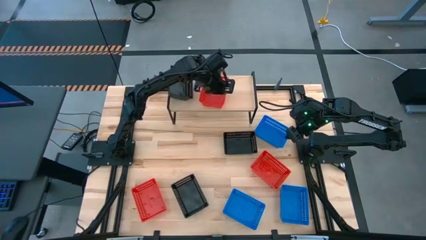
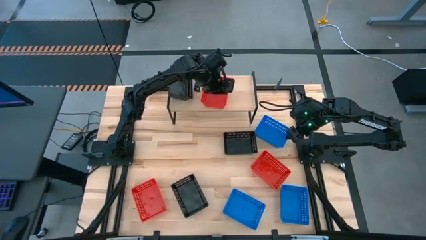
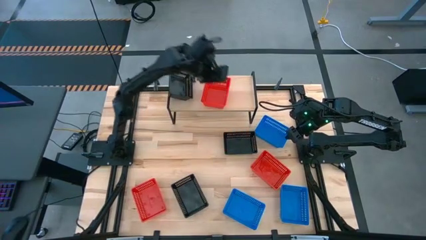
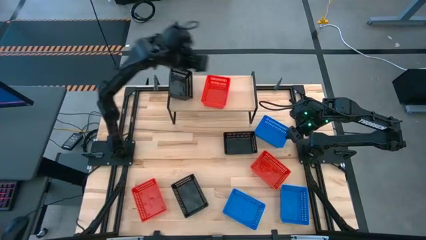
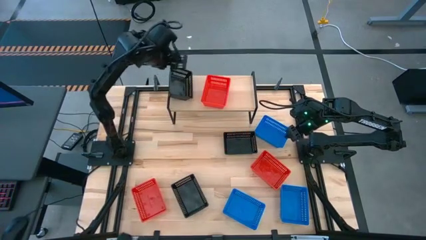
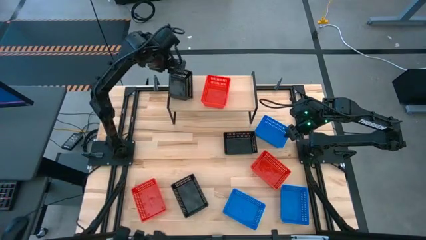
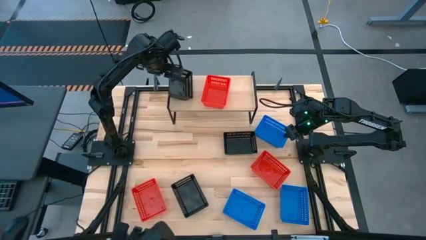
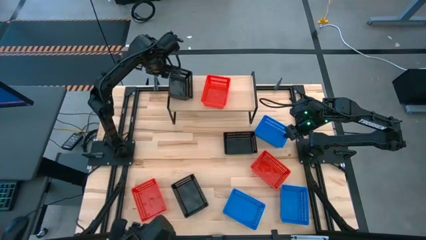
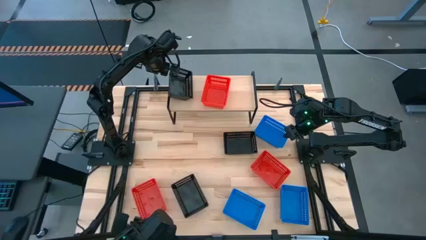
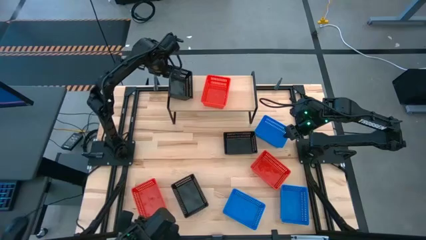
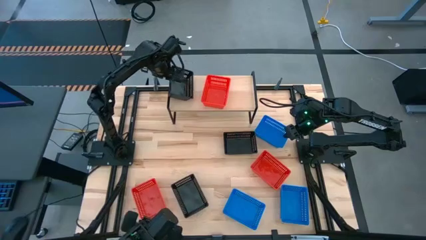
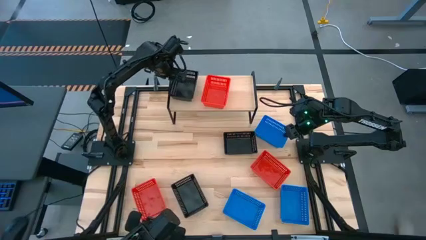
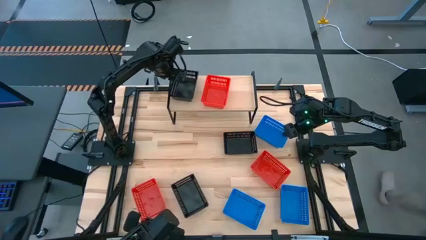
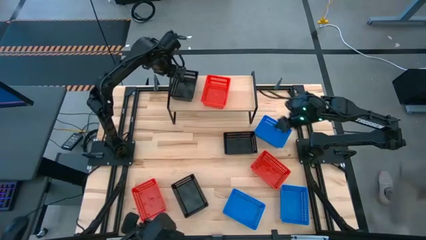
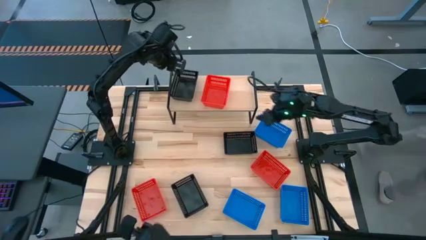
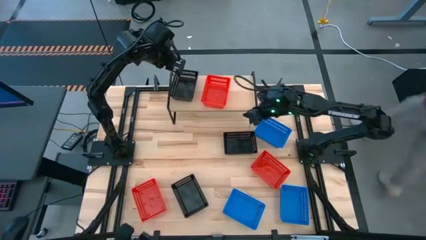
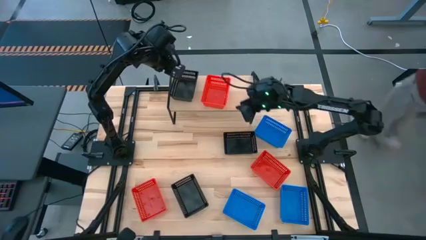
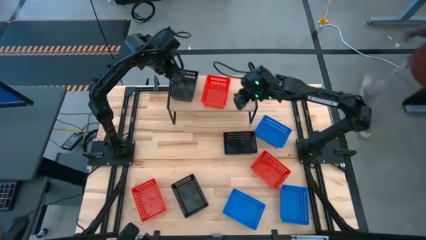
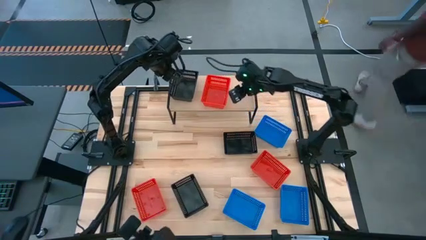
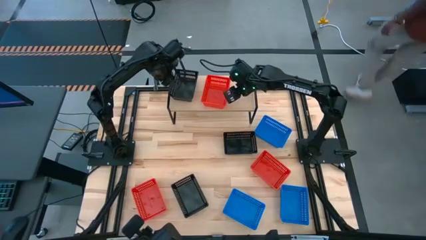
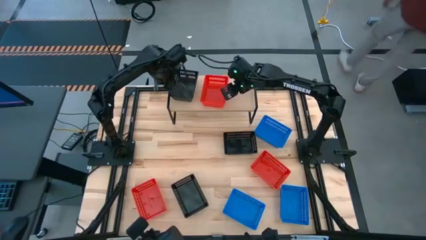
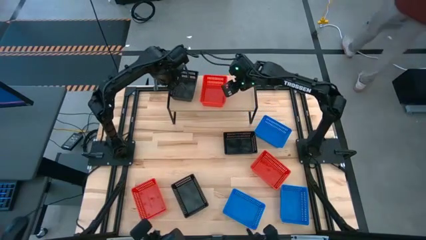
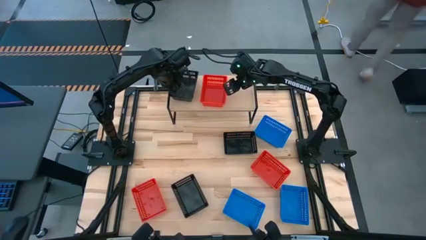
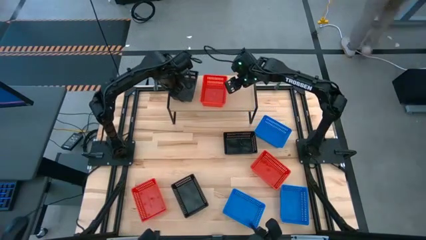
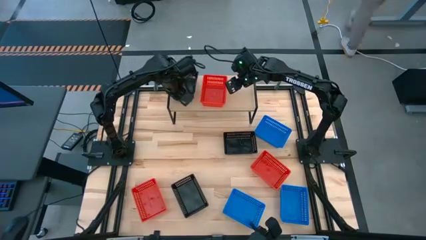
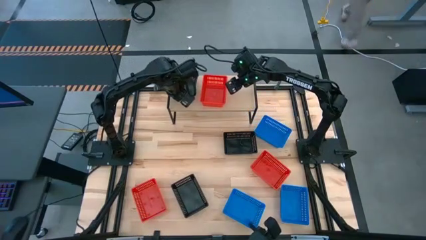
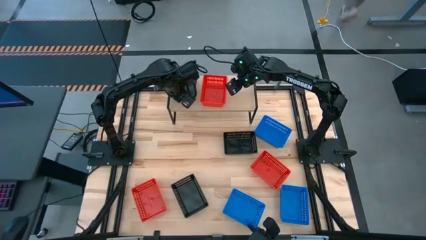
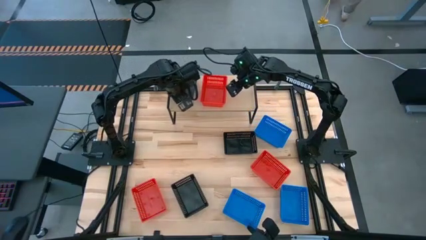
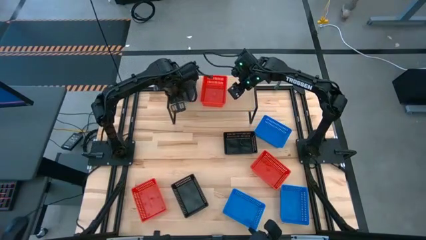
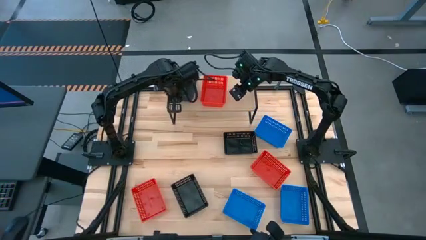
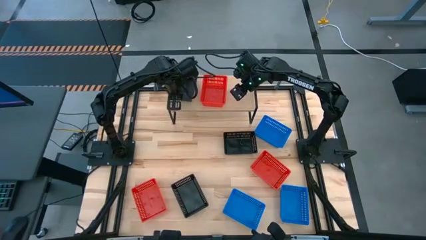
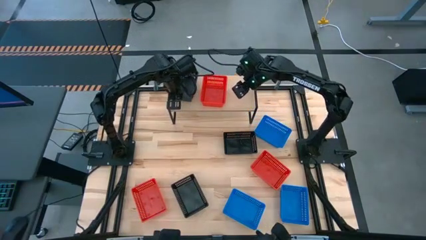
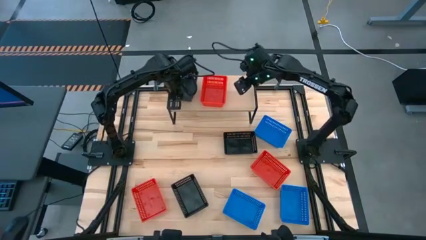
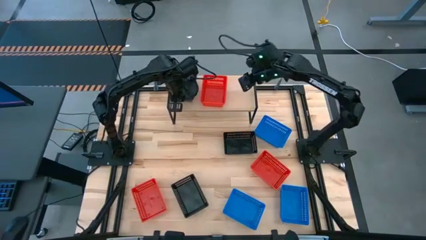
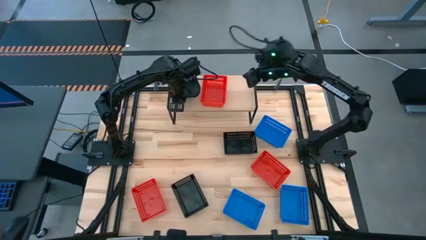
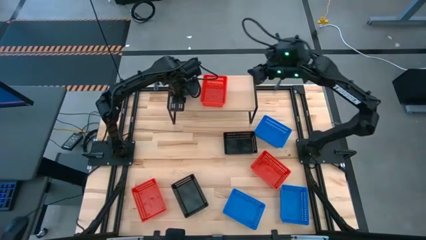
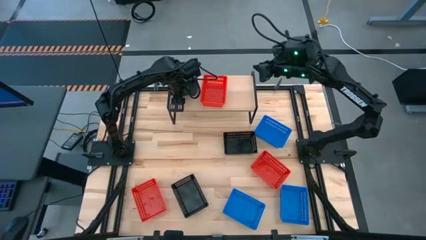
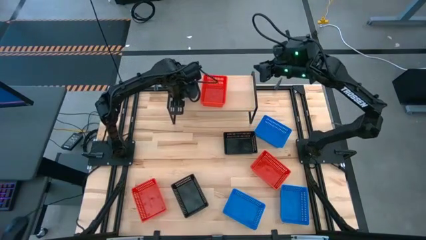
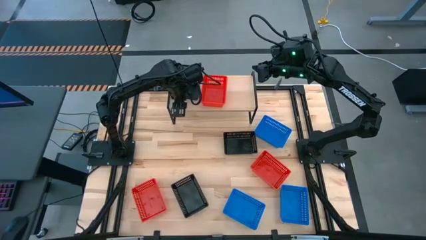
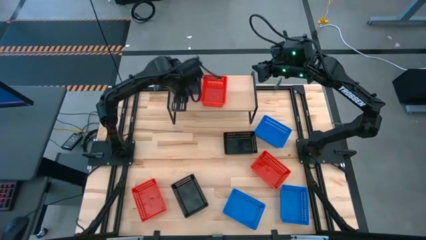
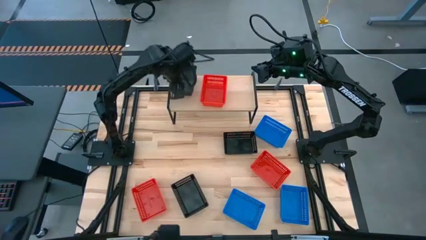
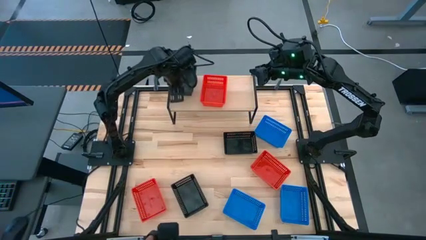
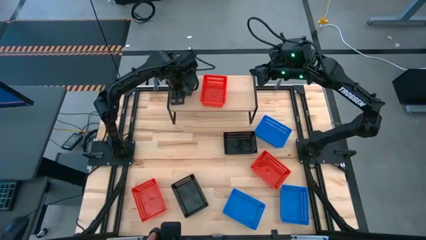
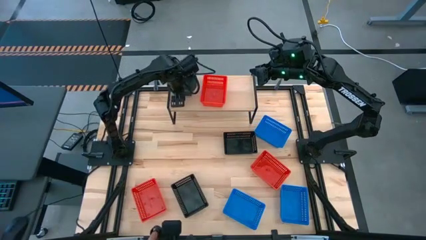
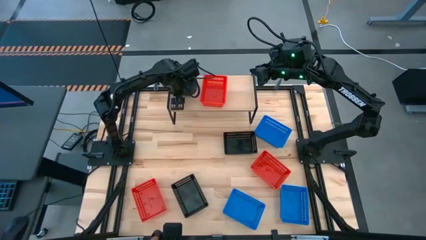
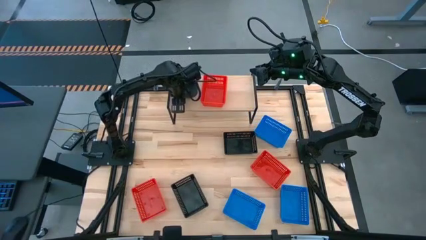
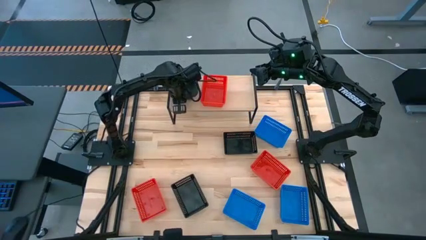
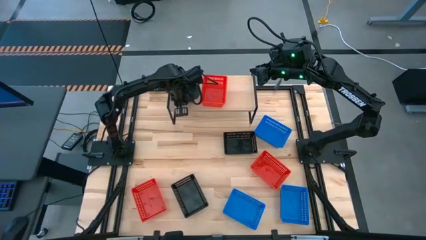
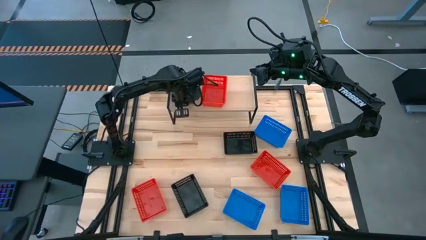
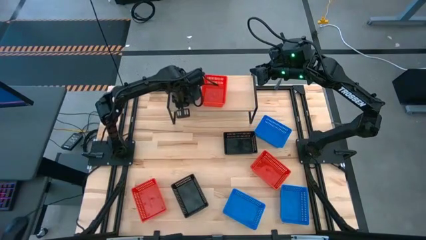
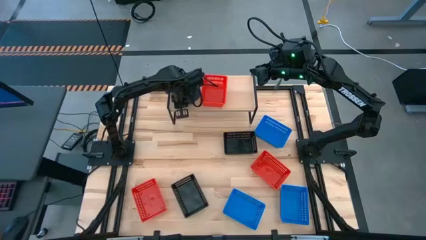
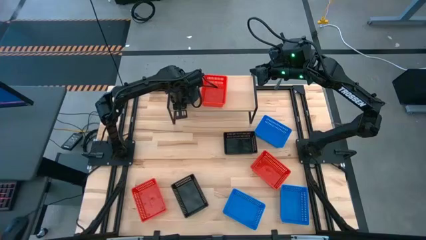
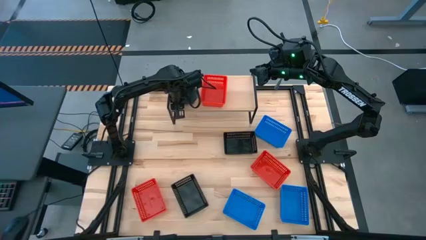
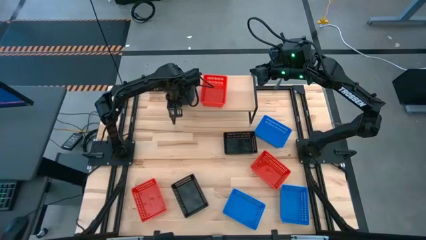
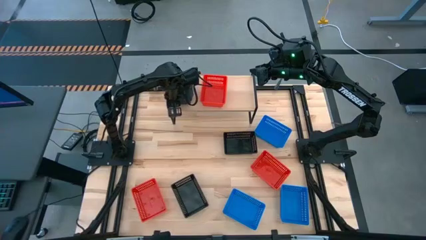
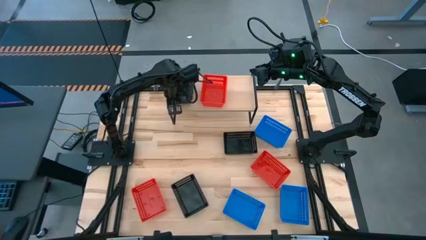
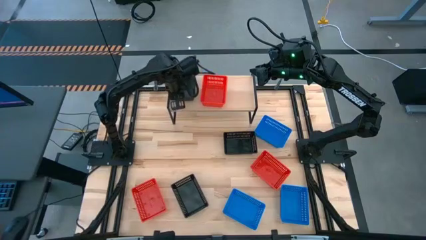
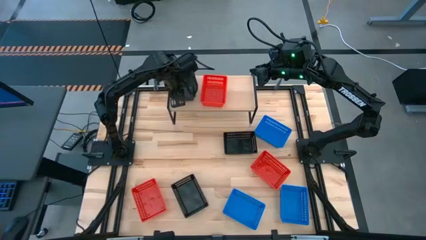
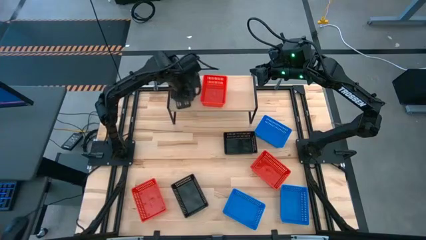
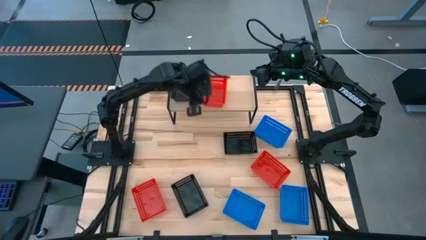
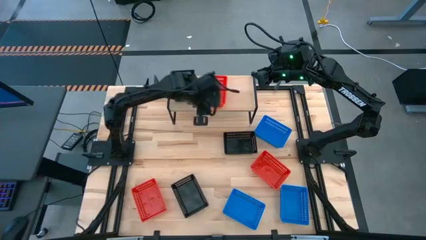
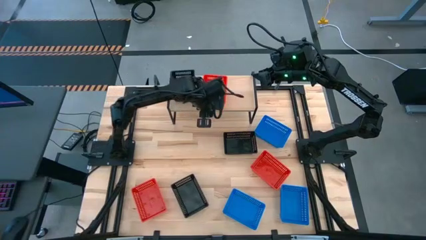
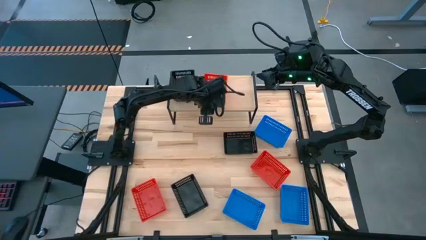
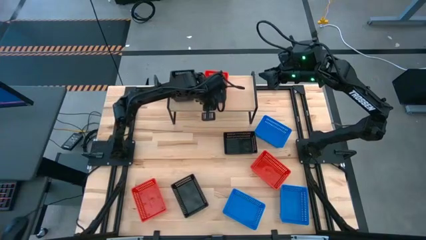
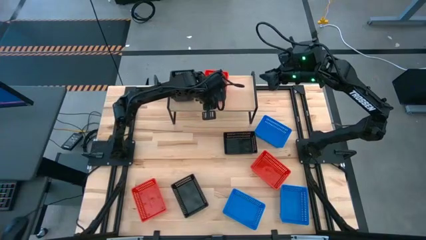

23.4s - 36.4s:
Task: Stack baskets on shelf by color
Adjust the bins on the shelf

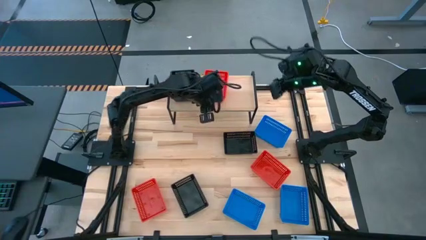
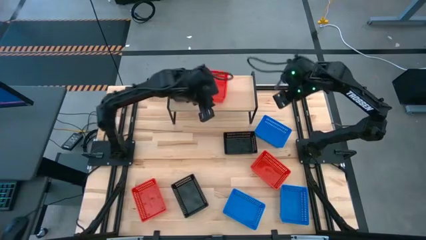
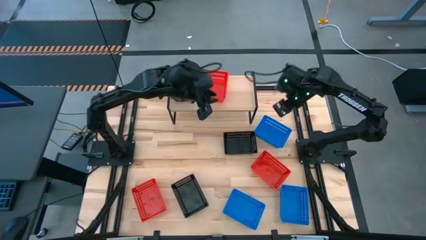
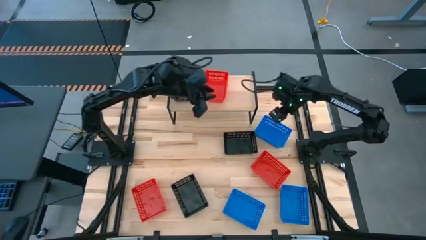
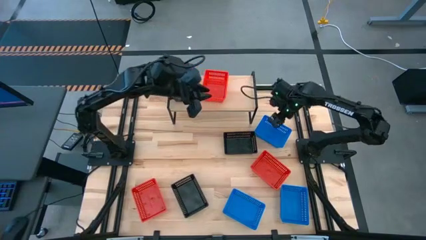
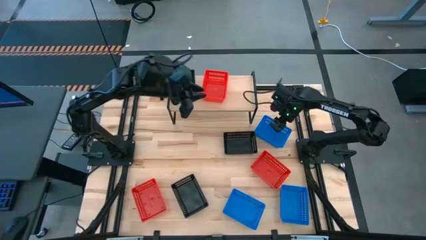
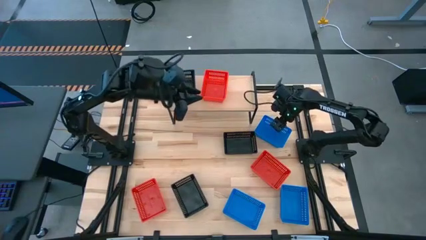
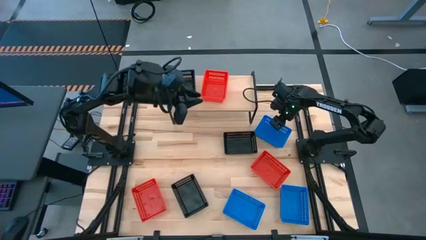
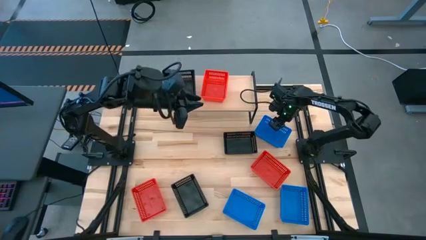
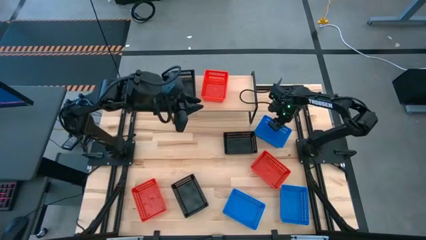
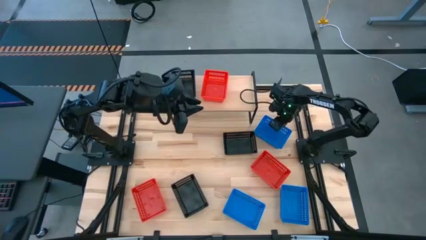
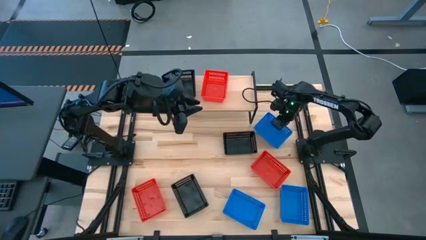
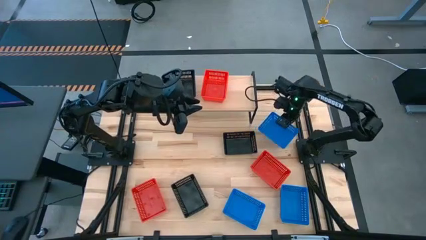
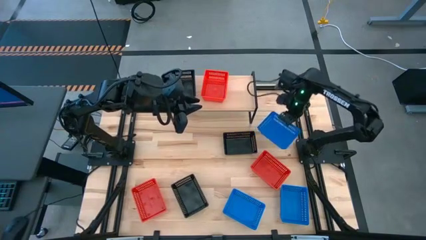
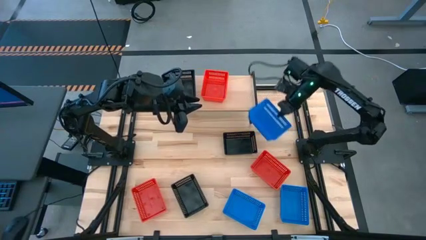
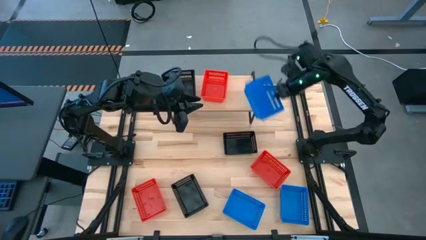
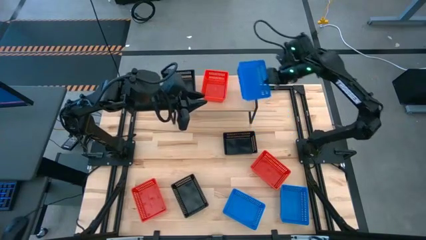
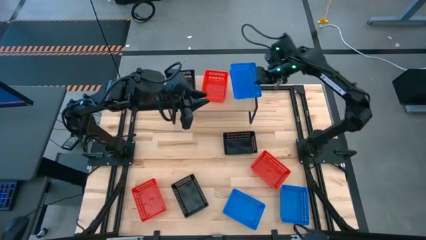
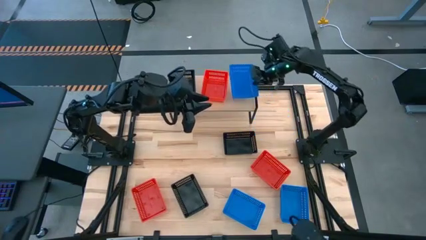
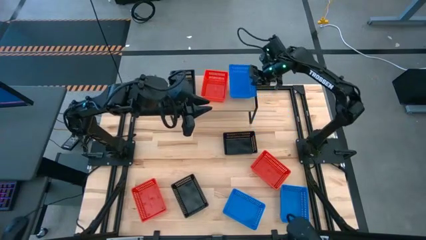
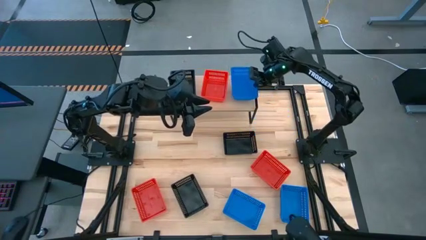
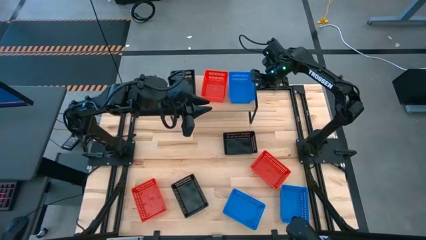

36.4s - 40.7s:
Put the top blue bin on the shelf
